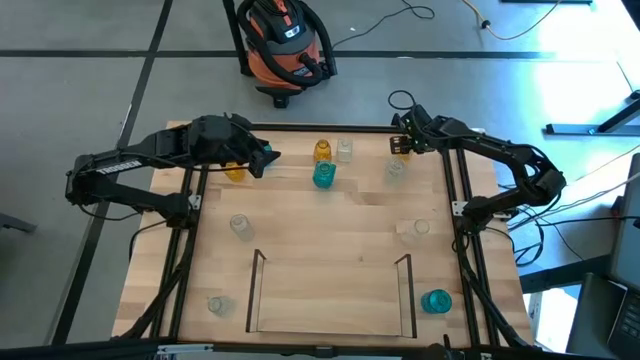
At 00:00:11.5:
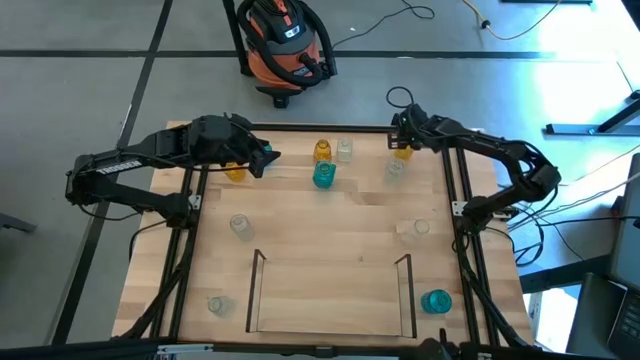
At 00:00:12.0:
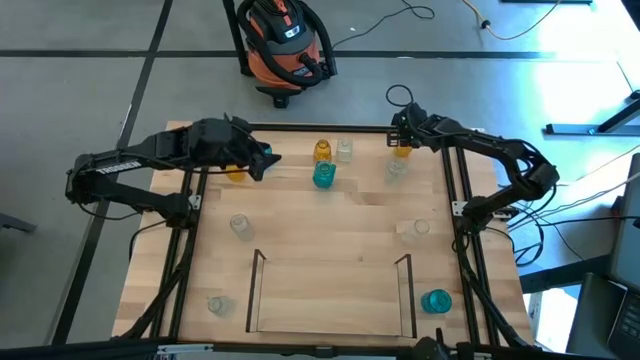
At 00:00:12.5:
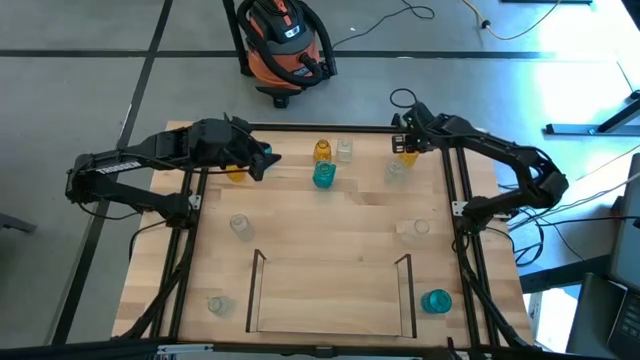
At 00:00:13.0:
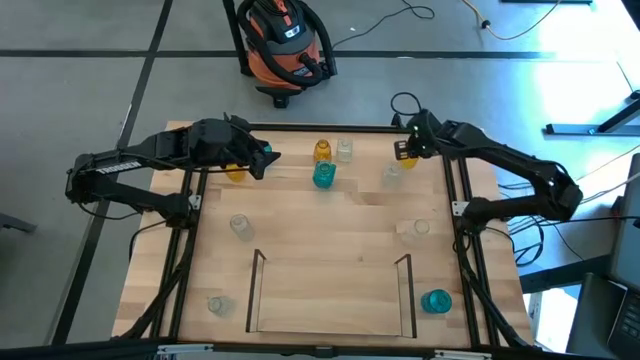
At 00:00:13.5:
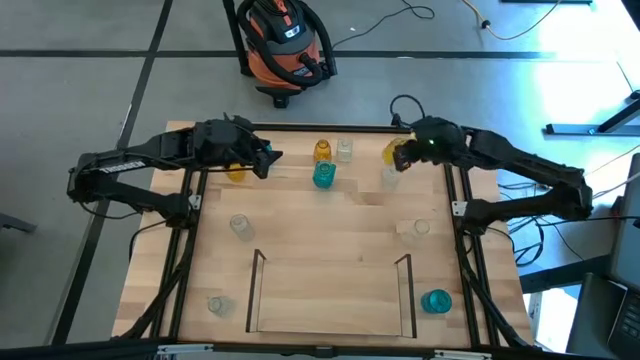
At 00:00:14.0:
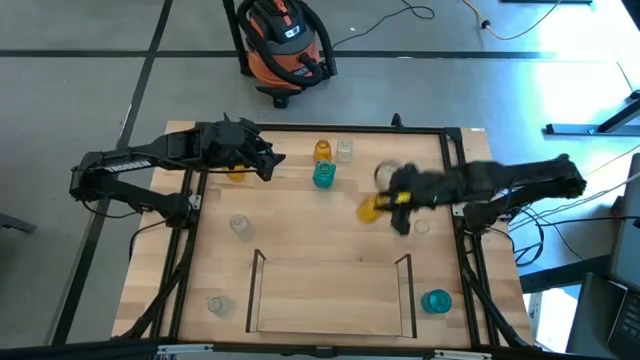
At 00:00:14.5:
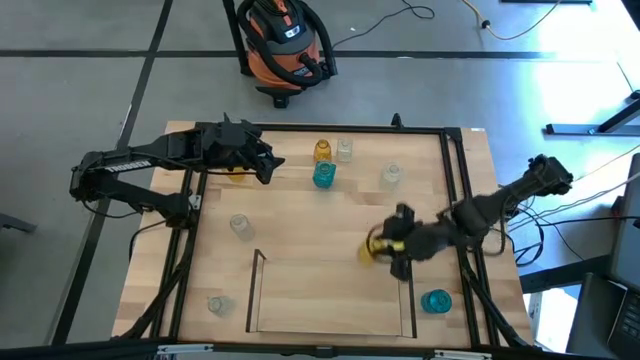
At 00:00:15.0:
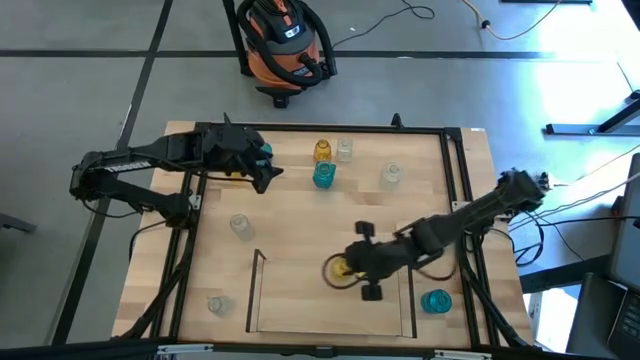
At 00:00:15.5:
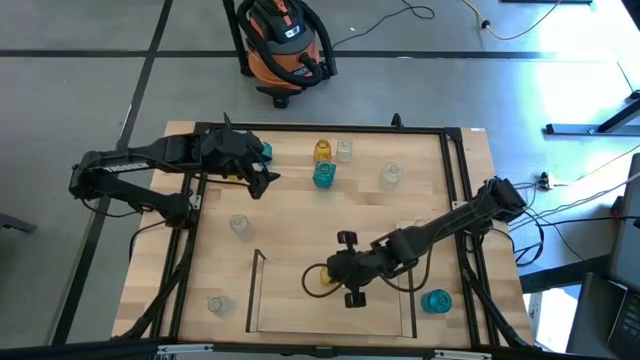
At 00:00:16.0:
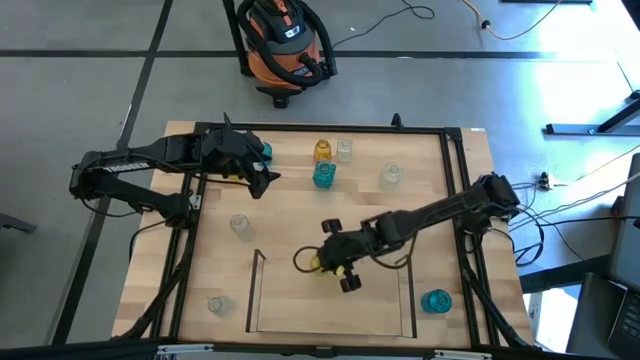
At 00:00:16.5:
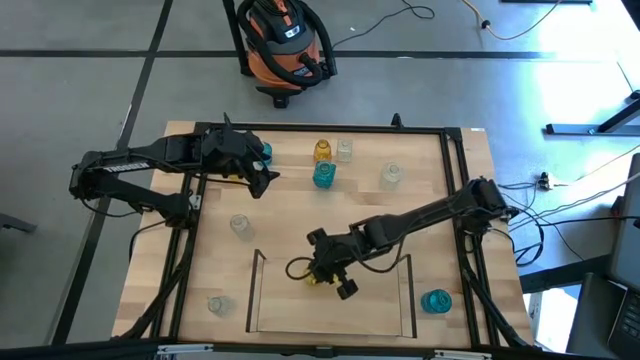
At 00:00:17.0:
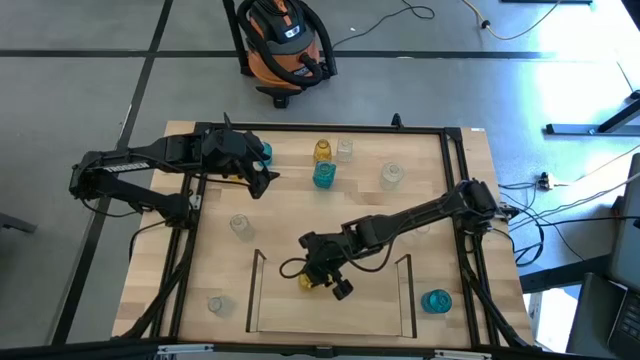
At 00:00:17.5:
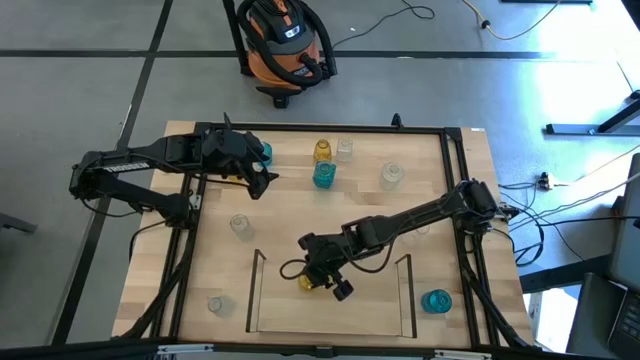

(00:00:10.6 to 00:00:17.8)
Task: sort vases onto shelf
Put the yellow vase on the shelf

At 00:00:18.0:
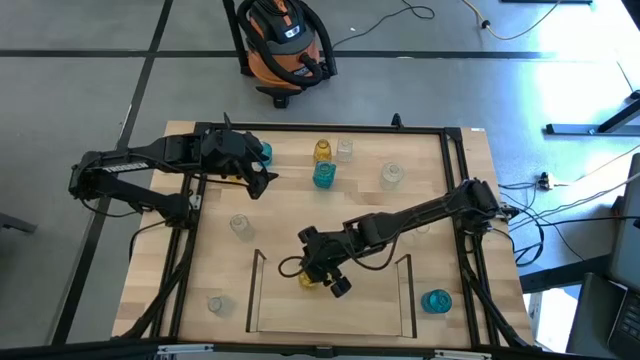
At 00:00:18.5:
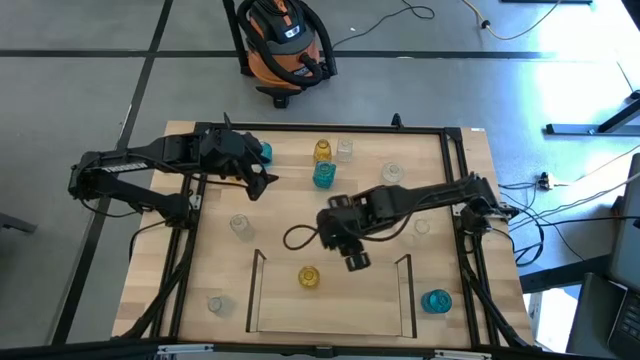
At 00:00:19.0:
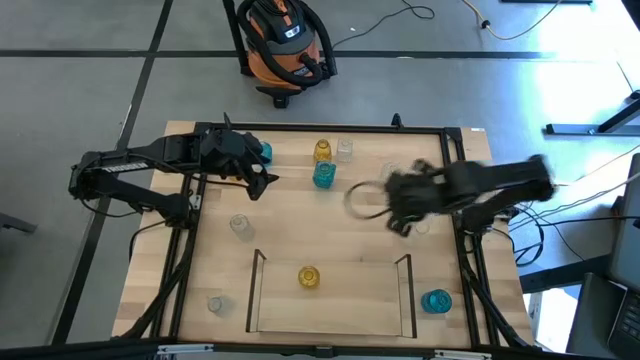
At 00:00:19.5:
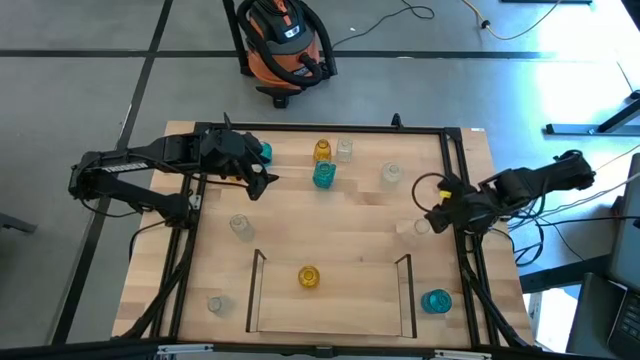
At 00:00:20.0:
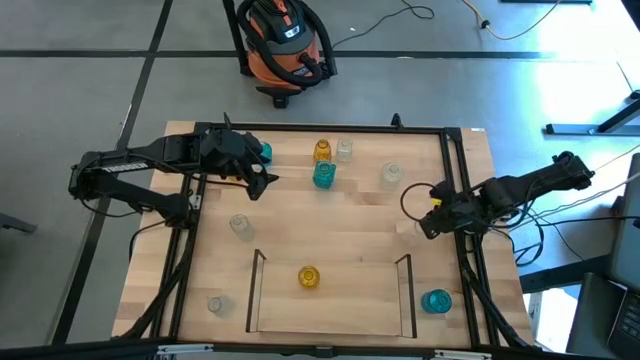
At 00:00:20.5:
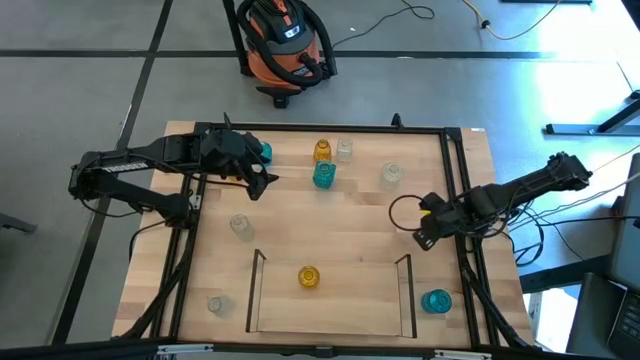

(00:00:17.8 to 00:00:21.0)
Put the transparent vase on the shelf

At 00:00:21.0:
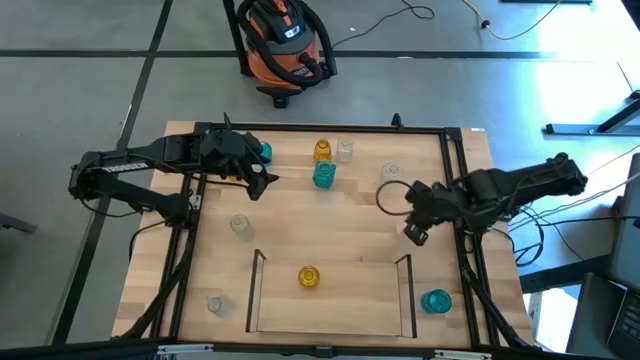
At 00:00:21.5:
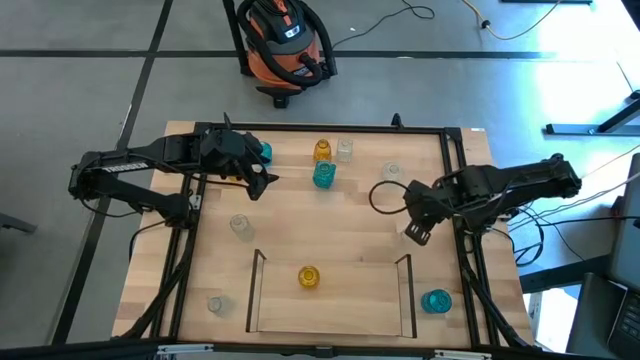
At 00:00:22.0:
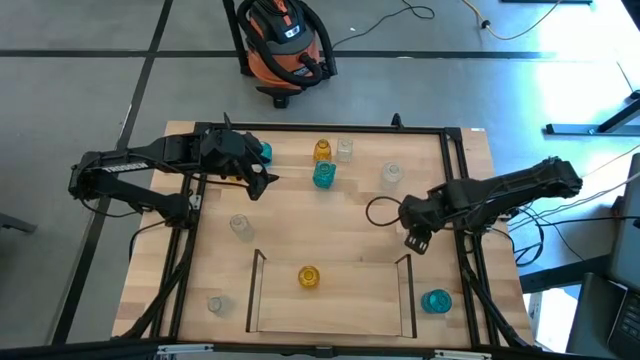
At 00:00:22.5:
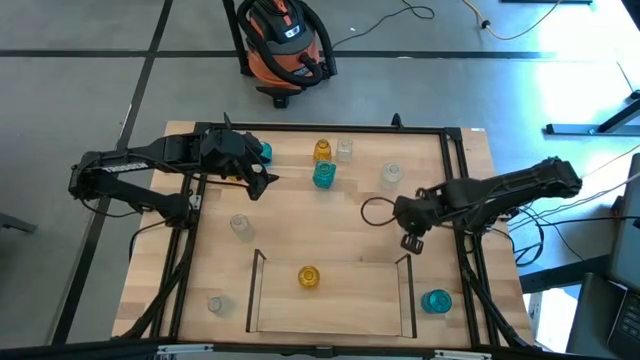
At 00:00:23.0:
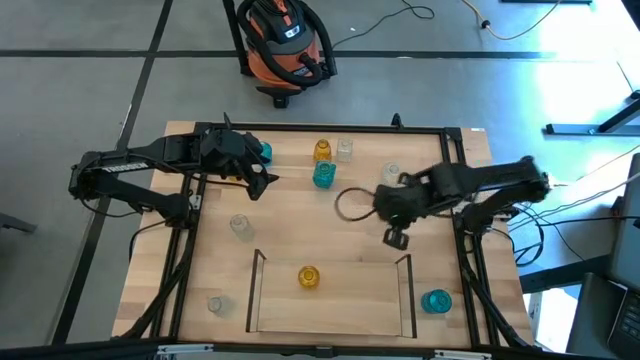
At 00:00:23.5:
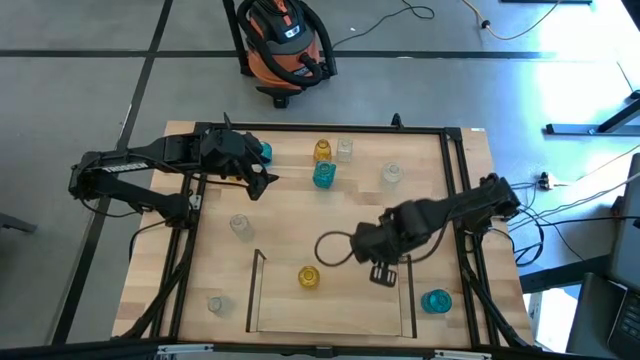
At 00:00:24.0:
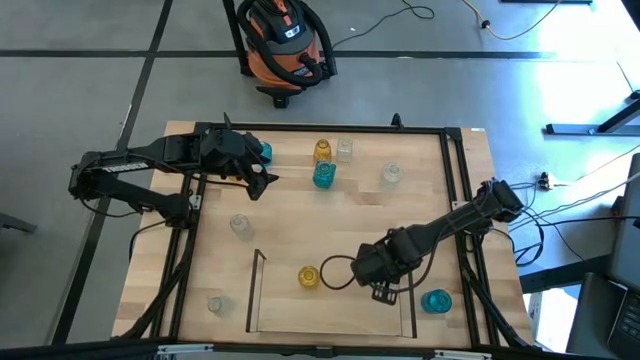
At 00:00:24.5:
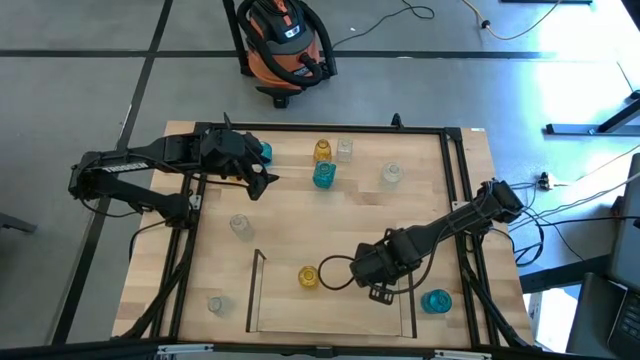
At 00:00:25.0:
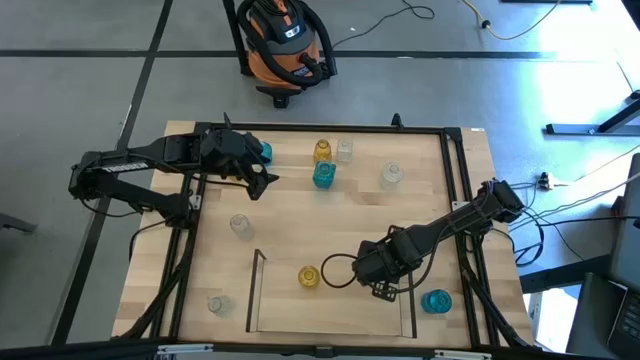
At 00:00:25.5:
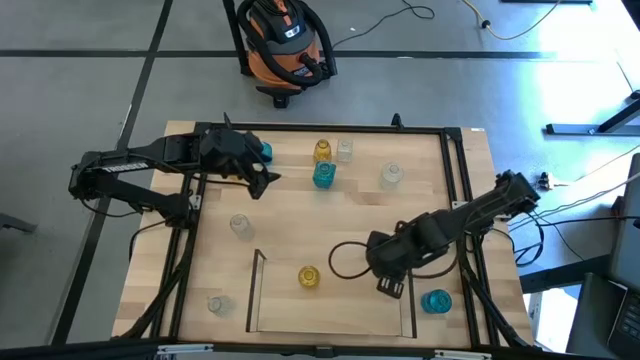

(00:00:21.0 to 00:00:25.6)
Put the transparent vase on the shelf

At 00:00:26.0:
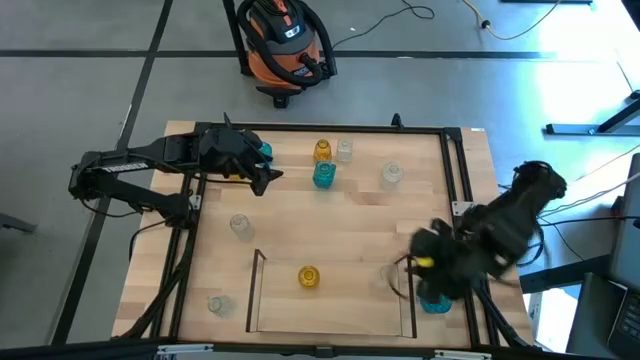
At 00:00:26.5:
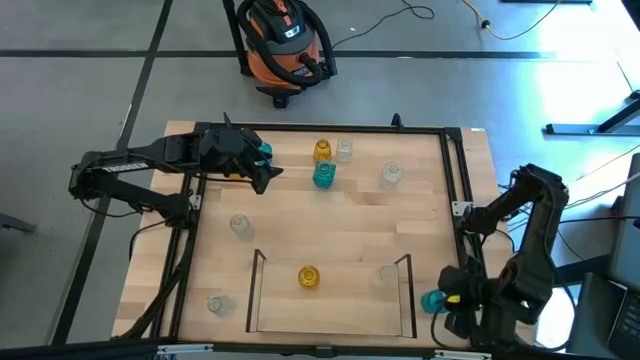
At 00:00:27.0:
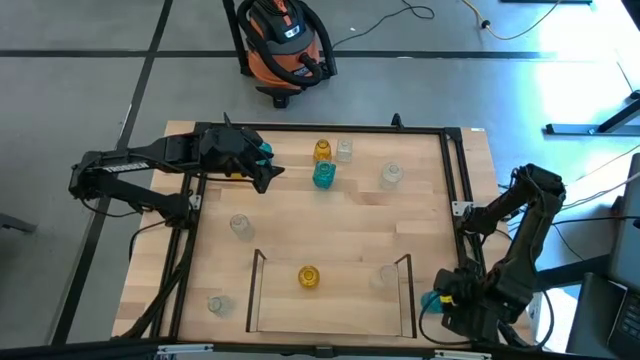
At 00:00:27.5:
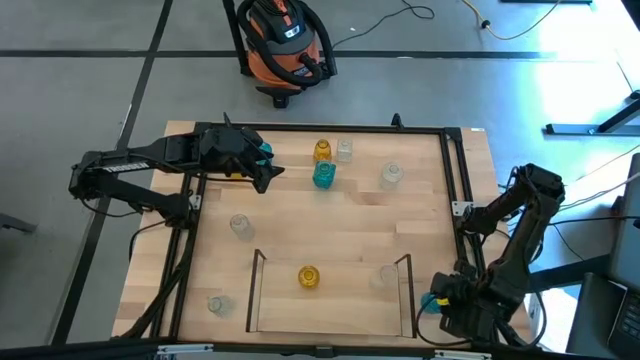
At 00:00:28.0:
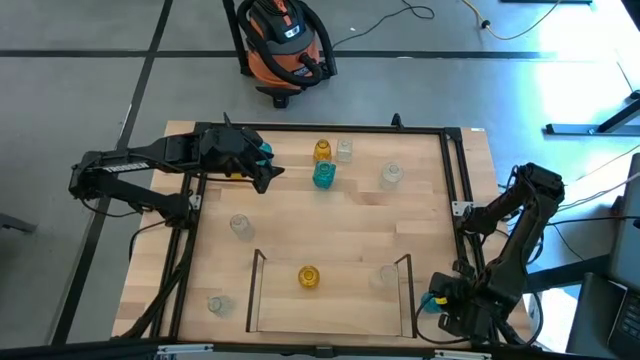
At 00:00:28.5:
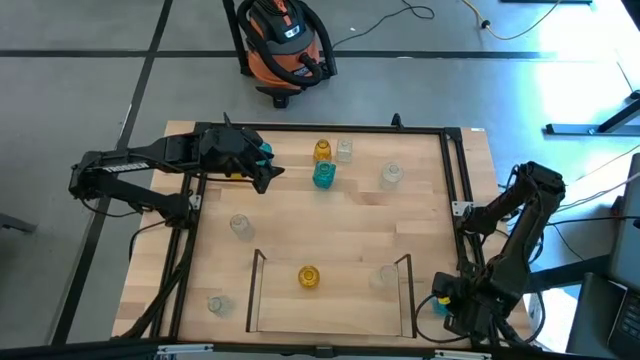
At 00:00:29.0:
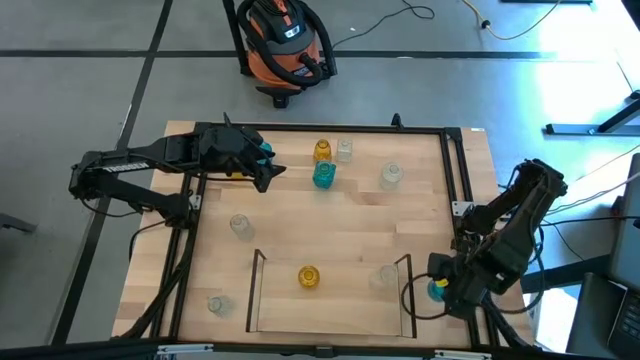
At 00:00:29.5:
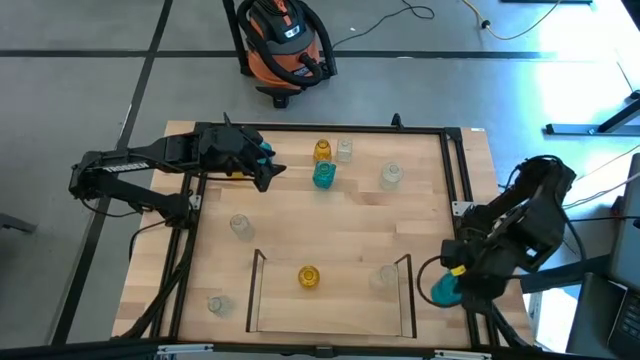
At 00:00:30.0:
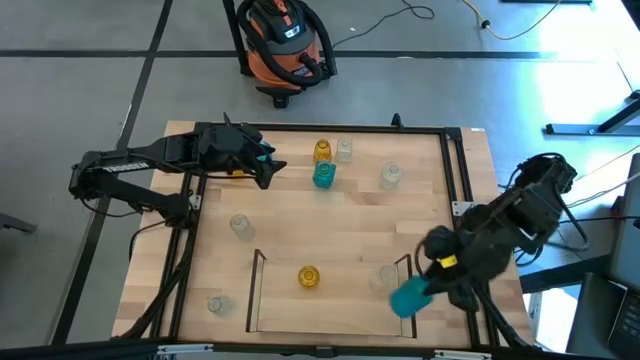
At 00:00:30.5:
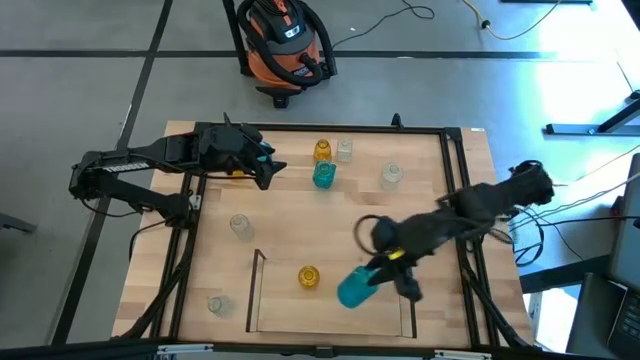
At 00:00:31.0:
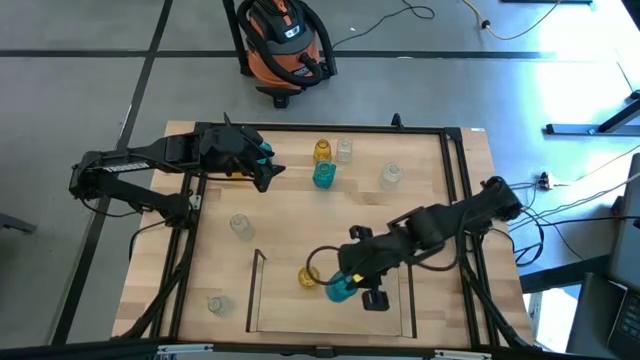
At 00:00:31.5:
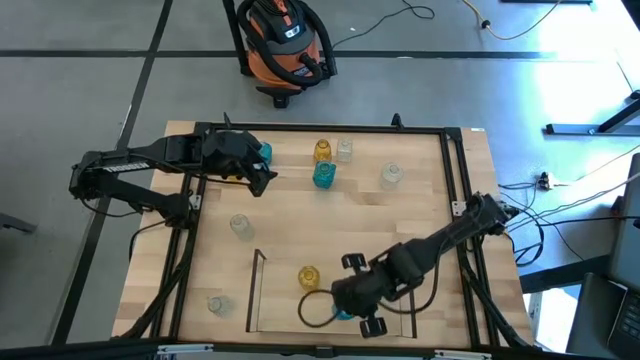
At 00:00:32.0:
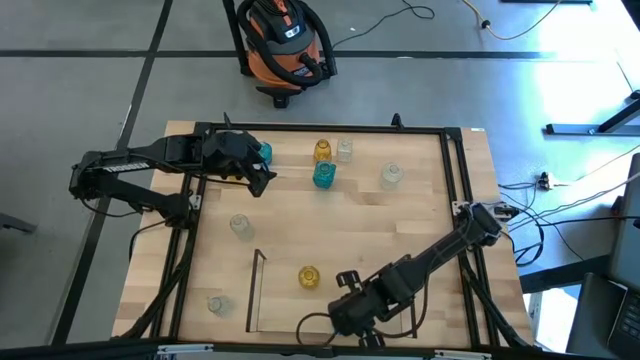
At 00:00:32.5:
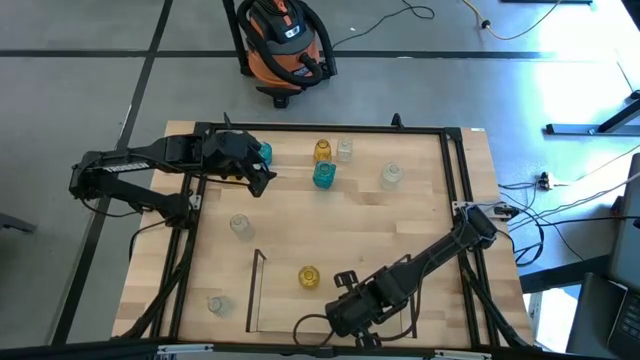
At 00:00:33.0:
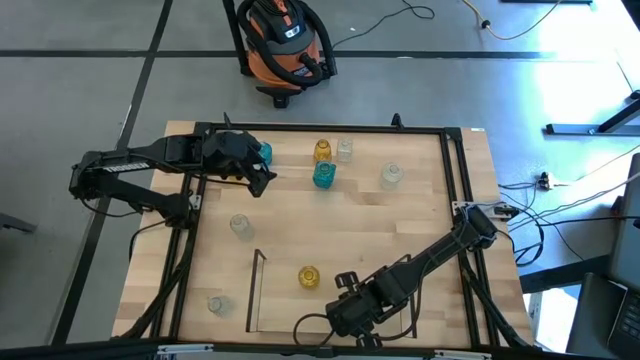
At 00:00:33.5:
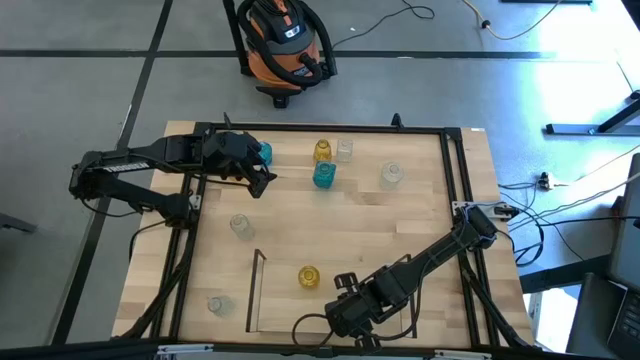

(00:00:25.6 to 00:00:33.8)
Put the blue vase on the shelf
